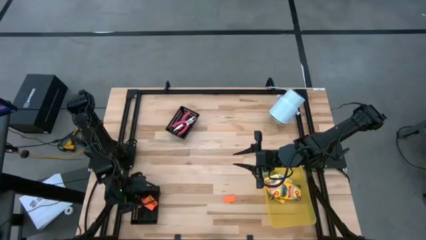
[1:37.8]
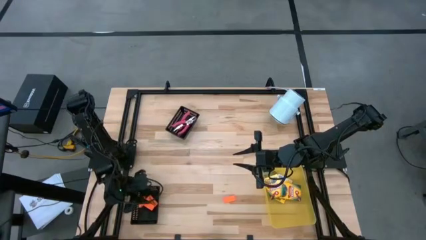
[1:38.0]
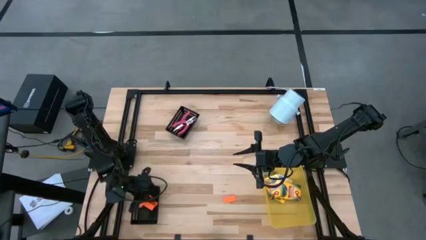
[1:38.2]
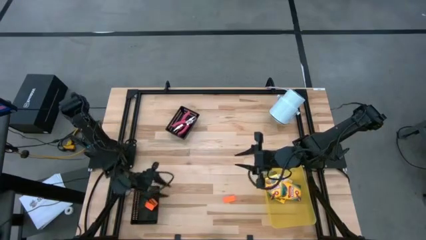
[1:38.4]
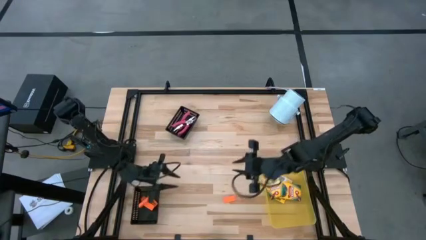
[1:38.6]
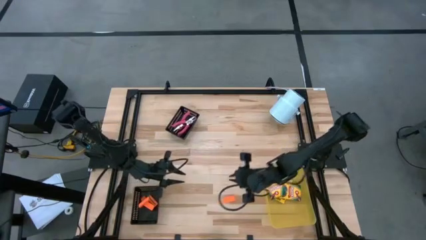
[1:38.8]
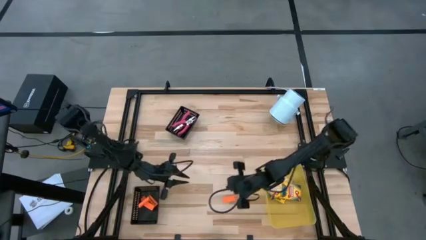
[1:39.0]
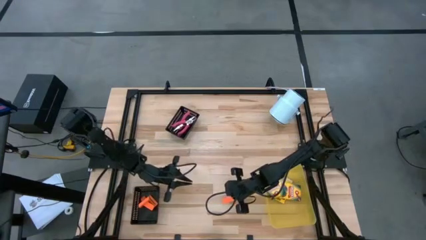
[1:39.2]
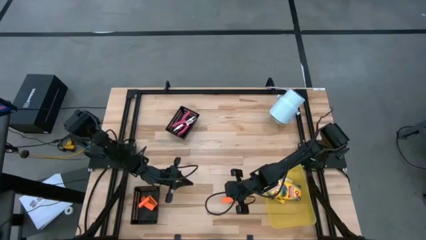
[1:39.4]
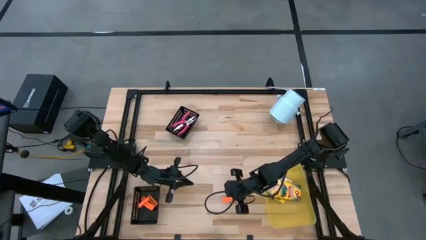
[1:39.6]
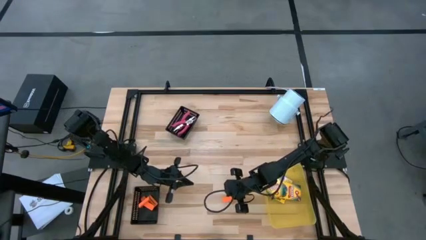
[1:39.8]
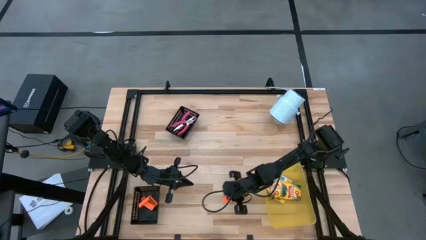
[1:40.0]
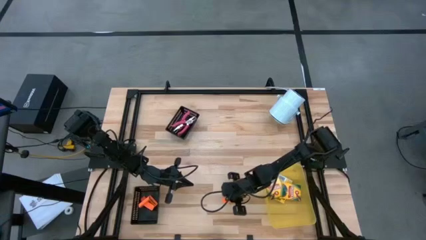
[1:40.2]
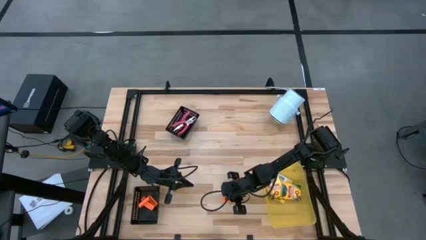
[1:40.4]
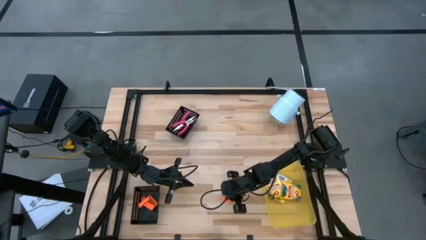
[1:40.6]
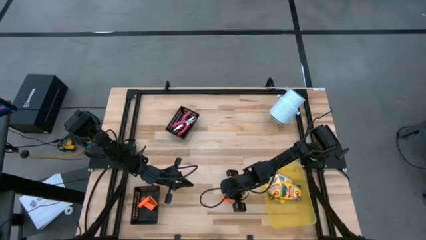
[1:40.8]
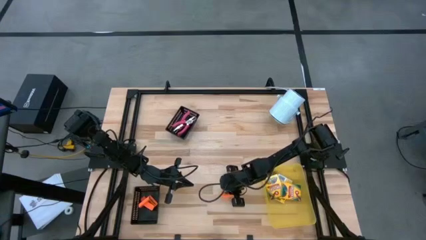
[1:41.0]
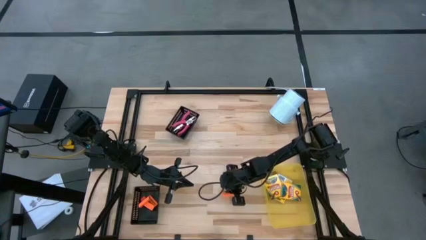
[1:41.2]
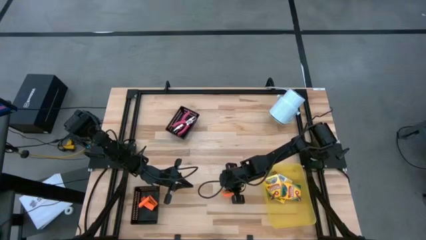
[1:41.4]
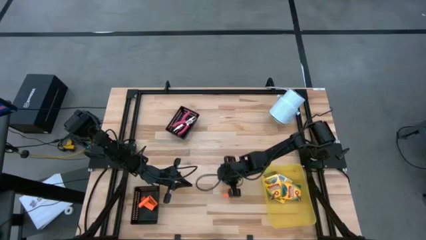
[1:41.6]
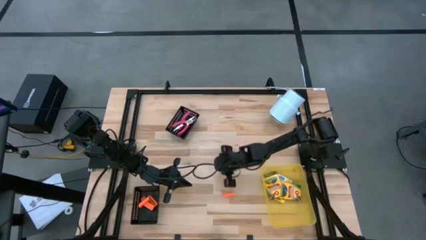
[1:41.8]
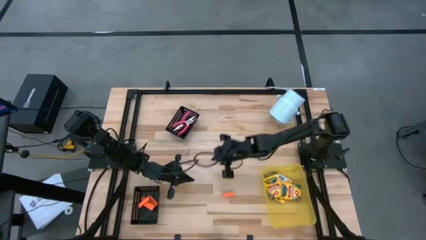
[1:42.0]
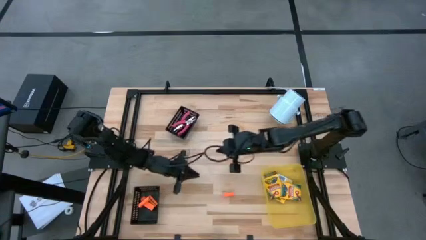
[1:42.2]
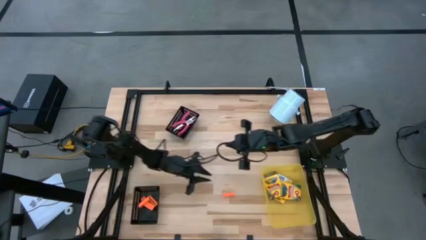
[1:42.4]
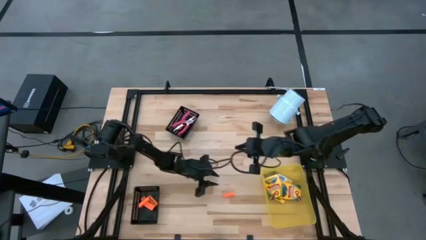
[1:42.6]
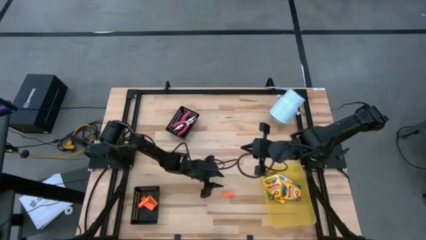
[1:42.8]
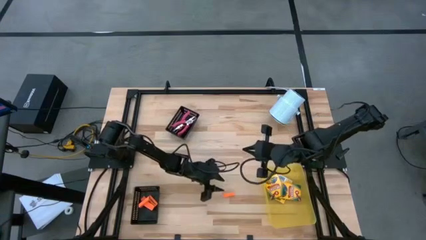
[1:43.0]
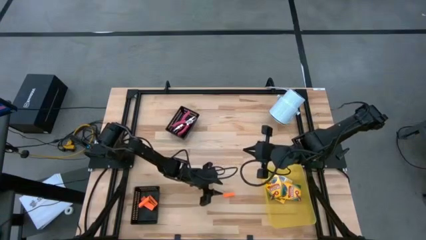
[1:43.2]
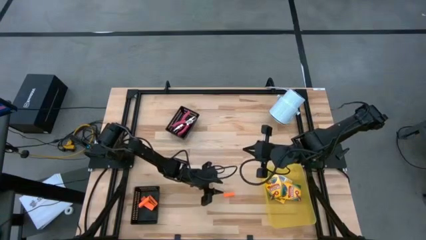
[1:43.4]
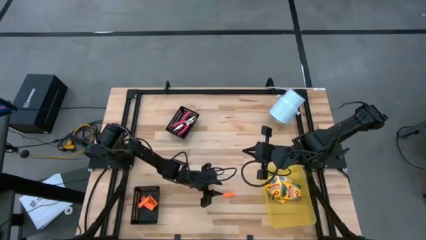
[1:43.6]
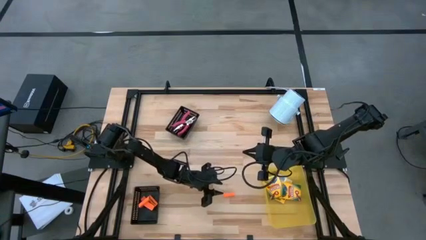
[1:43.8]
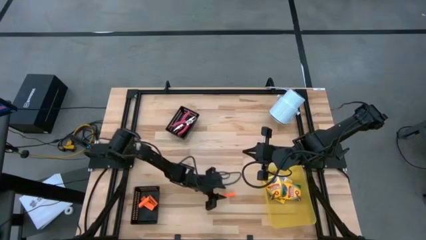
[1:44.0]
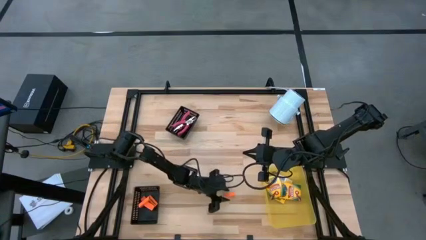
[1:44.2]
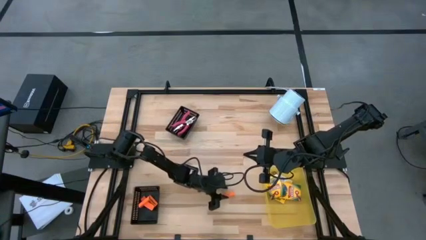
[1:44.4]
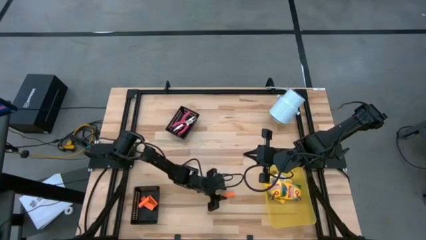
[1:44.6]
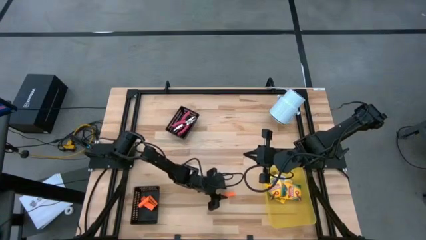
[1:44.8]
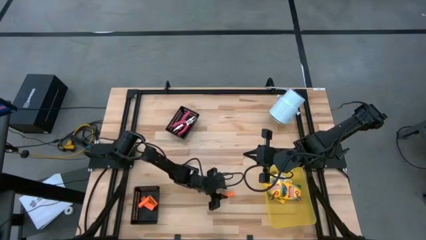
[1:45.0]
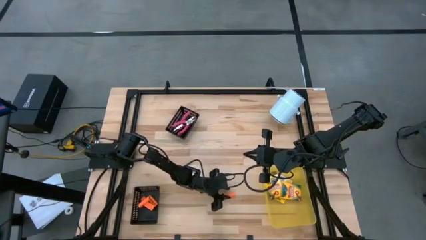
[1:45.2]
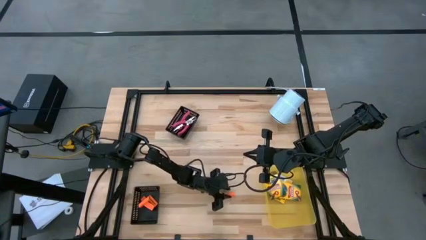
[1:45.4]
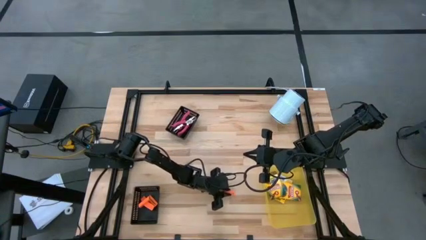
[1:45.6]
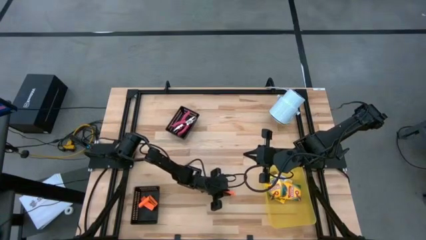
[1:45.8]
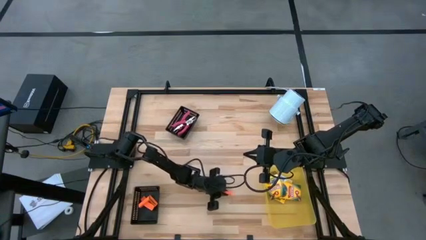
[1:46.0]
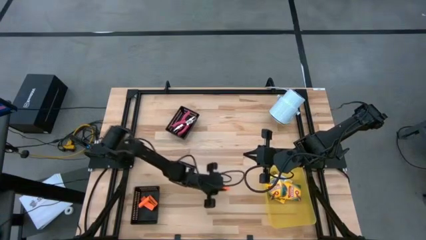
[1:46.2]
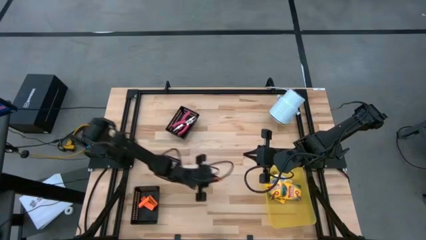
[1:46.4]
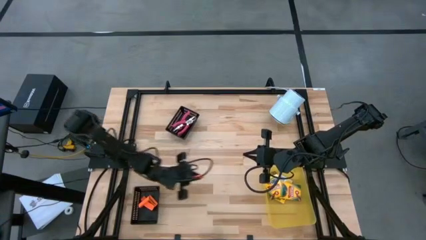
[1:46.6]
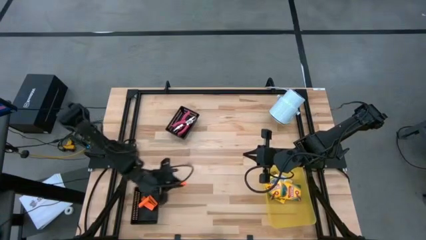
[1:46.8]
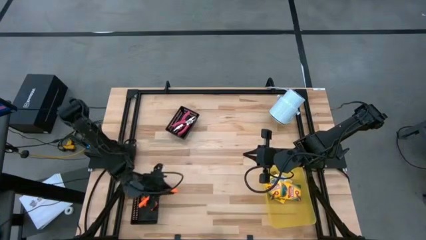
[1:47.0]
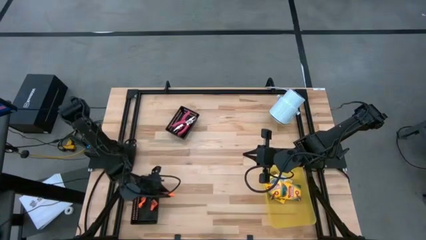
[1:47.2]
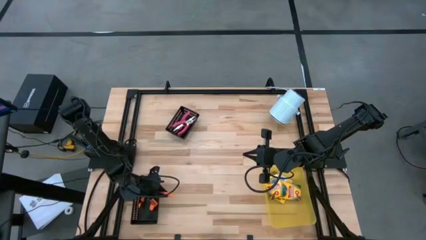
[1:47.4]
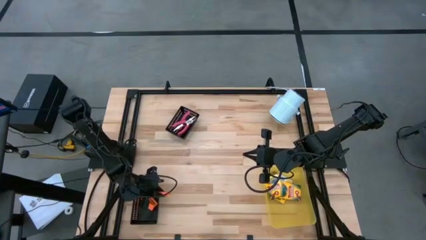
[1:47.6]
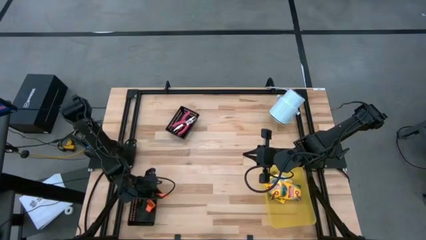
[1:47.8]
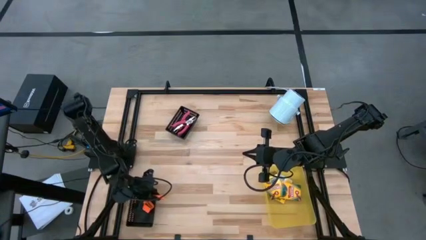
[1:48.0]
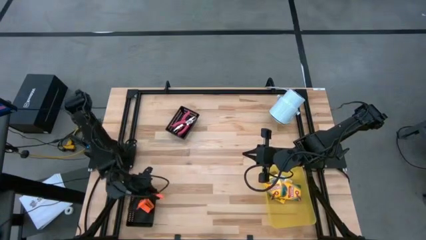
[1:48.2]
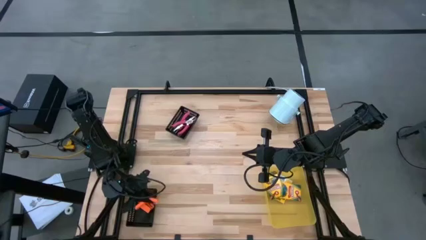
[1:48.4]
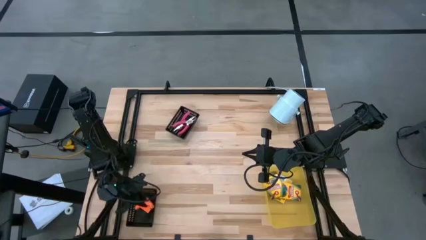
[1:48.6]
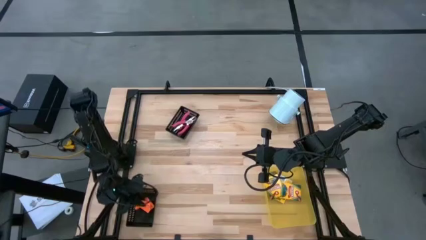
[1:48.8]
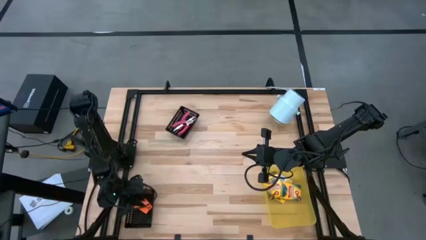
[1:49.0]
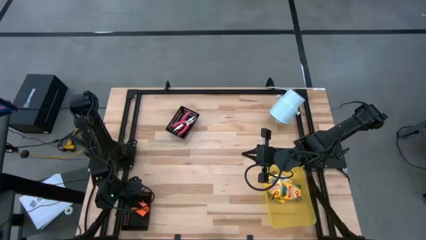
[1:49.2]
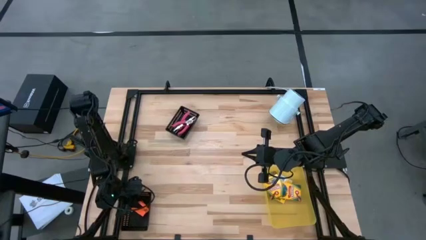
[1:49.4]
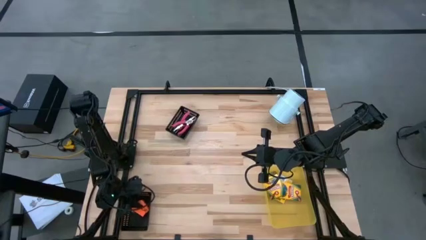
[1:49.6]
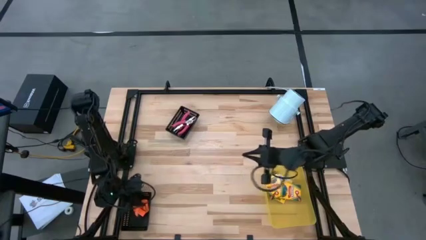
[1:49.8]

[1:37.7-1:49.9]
Task: Pick & Place School Supplies
Put the orange eraser into the bottom black basket

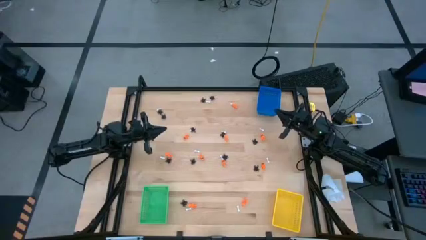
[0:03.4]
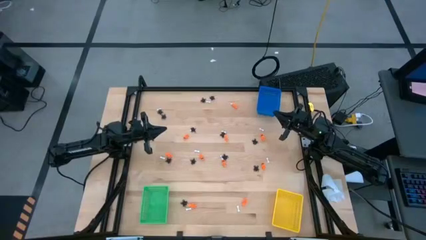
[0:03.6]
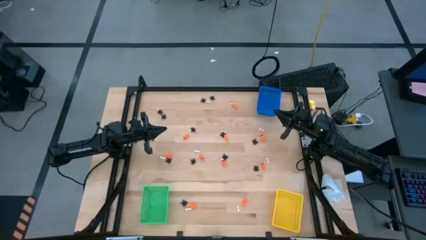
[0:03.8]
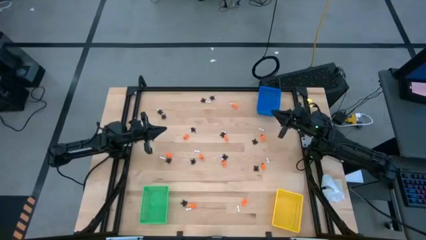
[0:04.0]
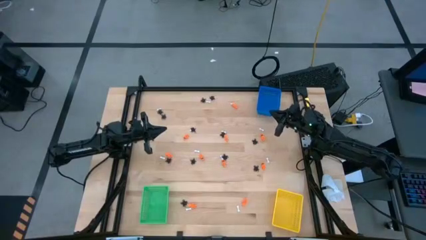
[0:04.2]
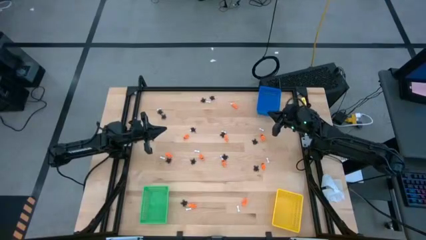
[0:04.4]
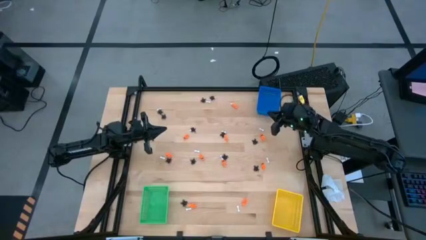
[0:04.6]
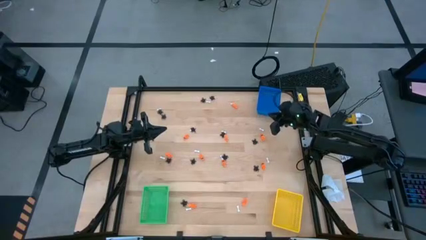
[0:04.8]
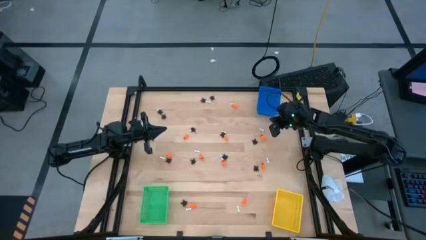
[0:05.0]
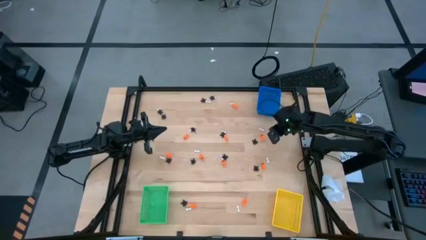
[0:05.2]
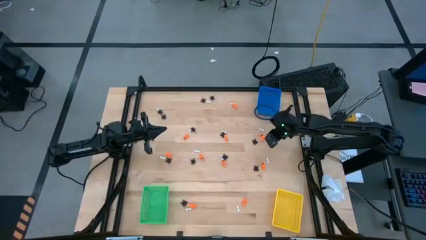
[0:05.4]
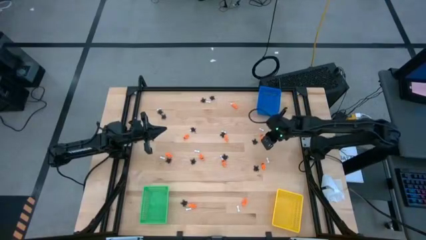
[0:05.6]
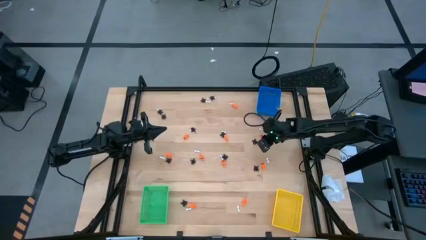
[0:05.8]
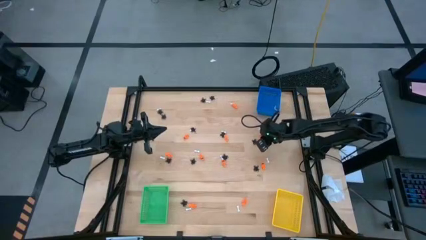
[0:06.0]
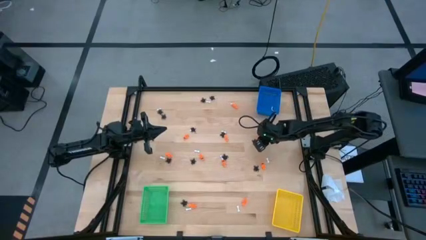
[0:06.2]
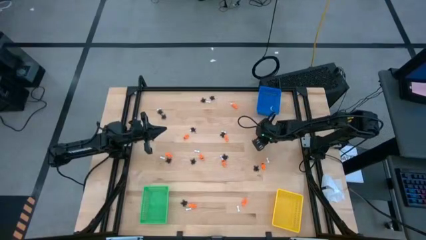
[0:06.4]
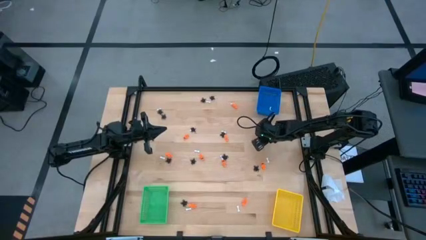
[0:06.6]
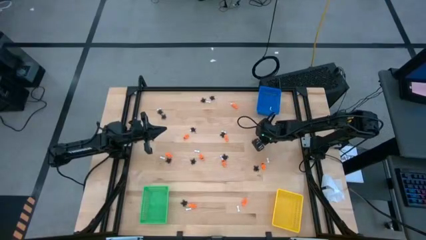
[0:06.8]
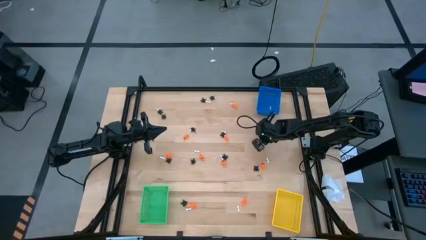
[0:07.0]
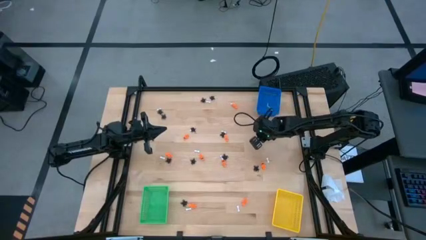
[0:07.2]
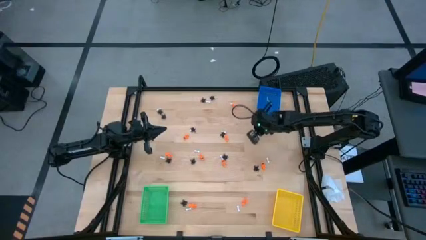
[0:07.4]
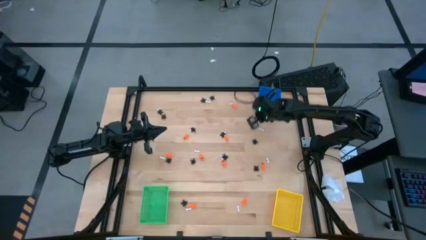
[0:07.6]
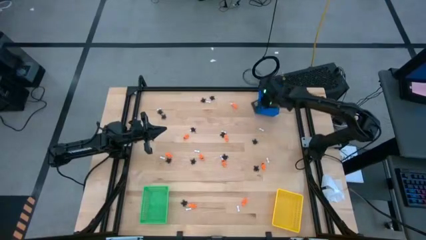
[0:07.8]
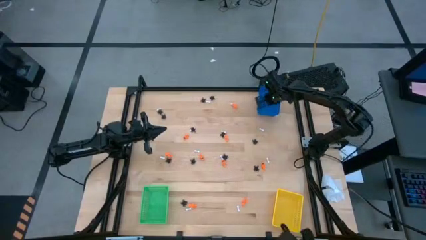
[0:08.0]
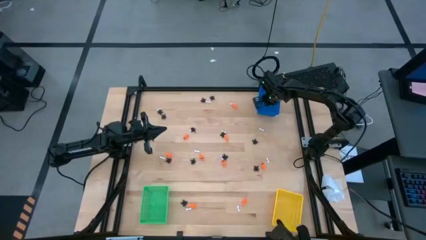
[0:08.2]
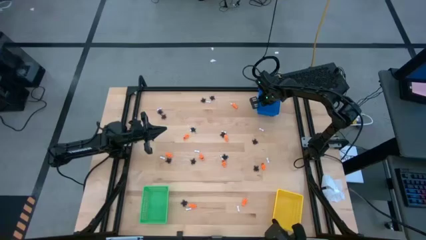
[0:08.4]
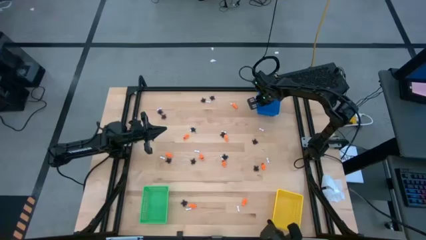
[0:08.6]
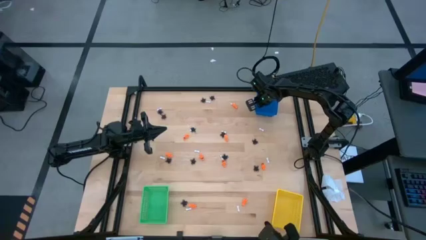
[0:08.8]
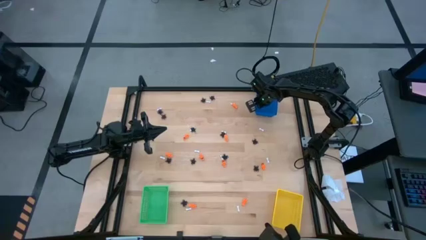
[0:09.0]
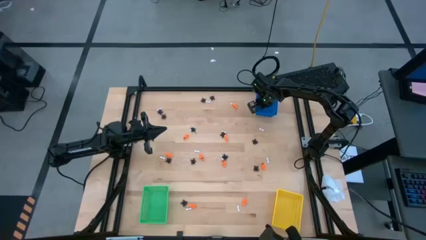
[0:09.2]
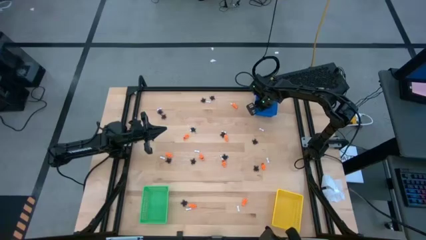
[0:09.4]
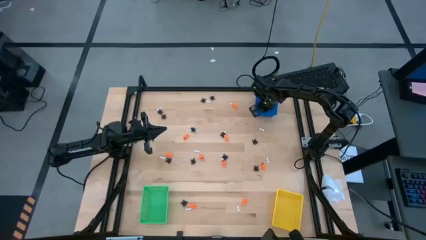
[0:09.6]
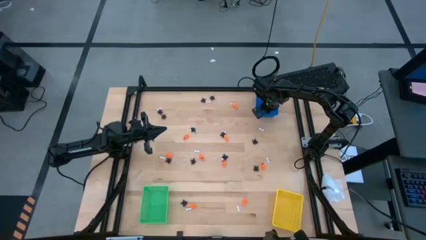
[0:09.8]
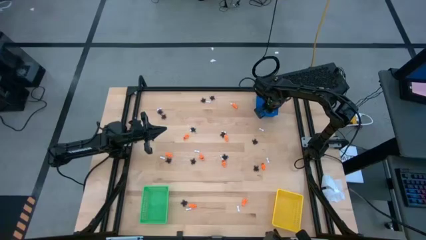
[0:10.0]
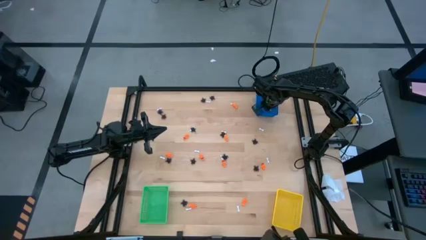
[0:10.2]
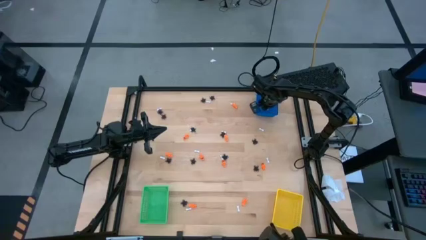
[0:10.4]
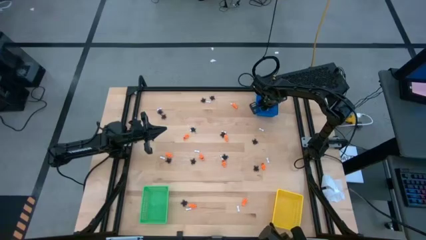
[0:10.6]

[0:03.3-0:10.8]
Task: Sort Halloween decoration
Put the orange toy skeleton into the blue bin
